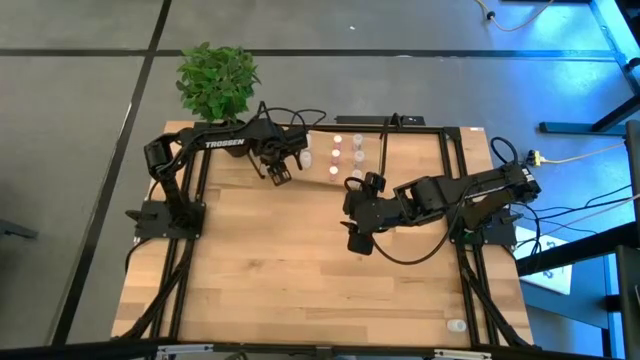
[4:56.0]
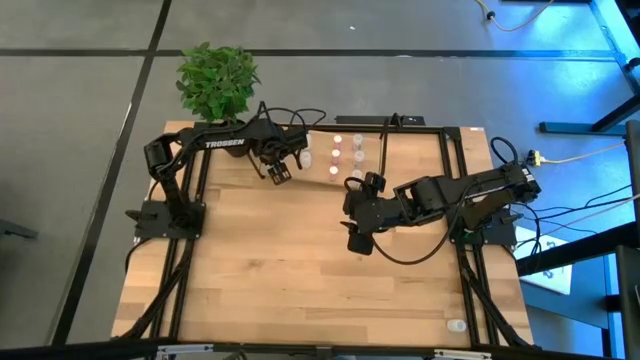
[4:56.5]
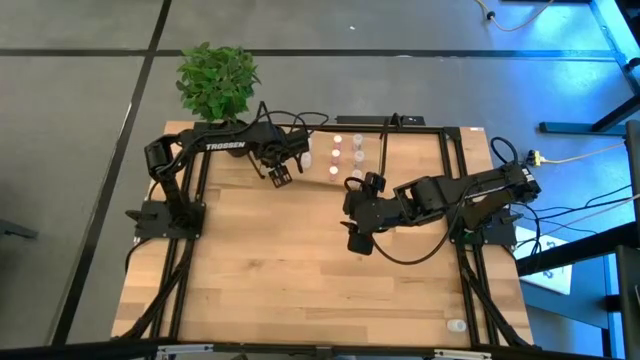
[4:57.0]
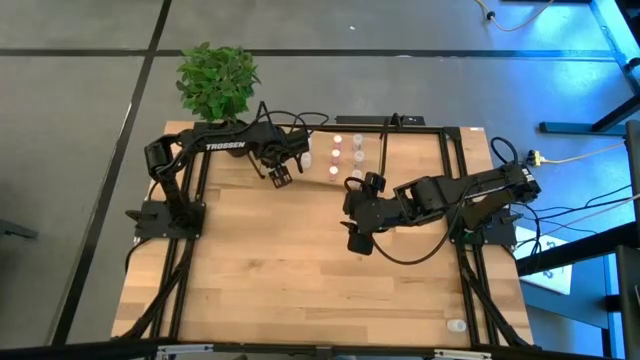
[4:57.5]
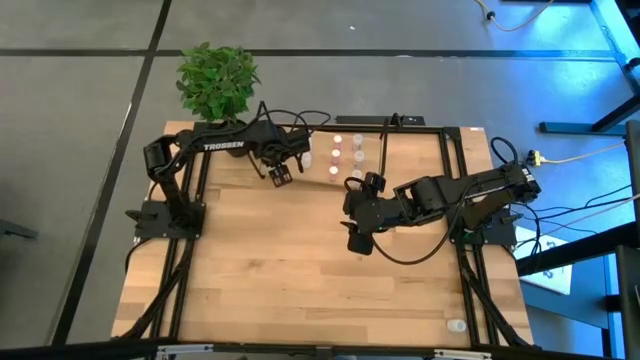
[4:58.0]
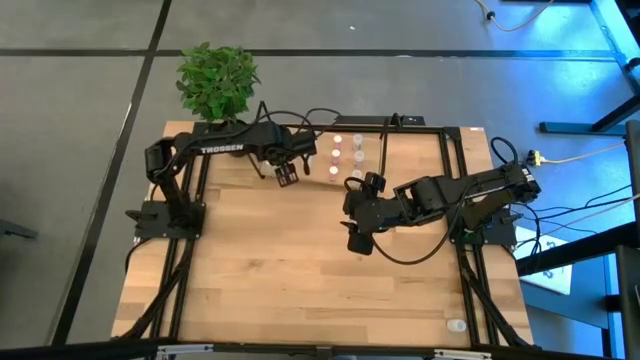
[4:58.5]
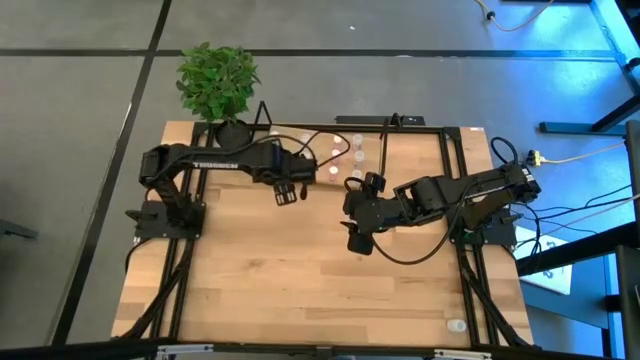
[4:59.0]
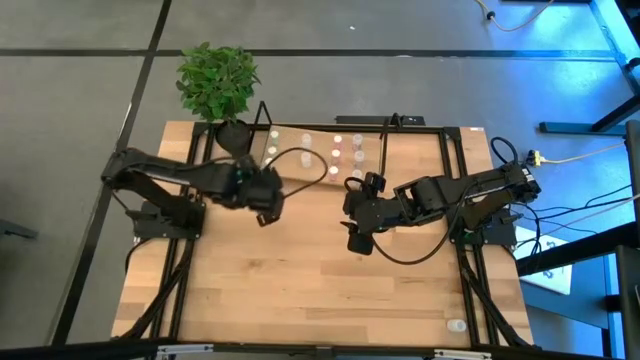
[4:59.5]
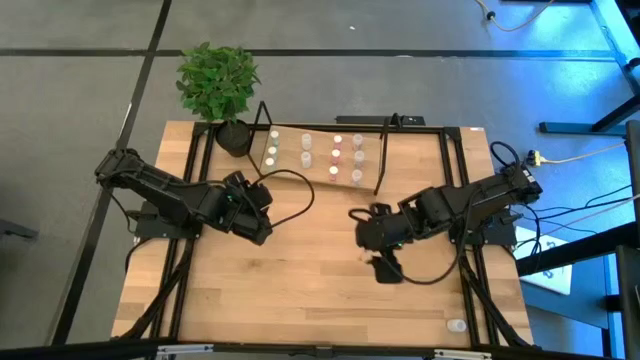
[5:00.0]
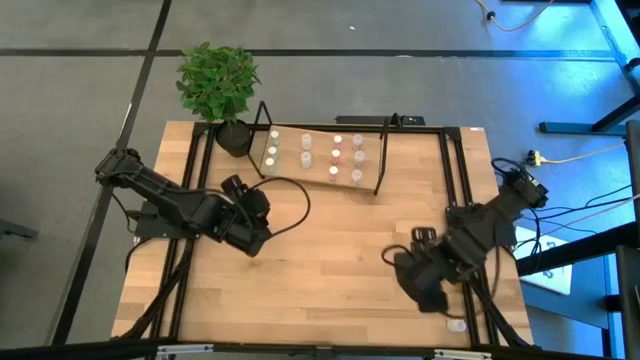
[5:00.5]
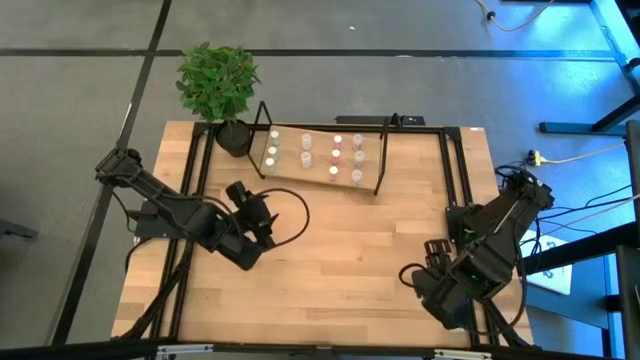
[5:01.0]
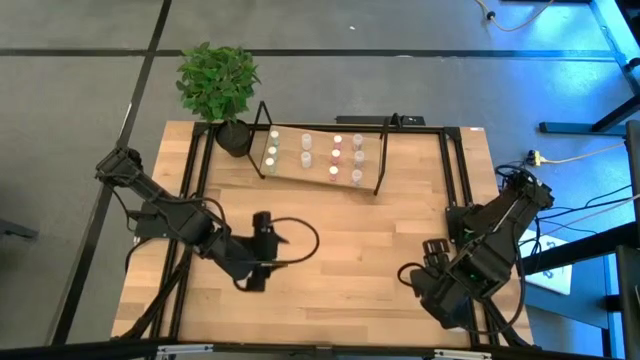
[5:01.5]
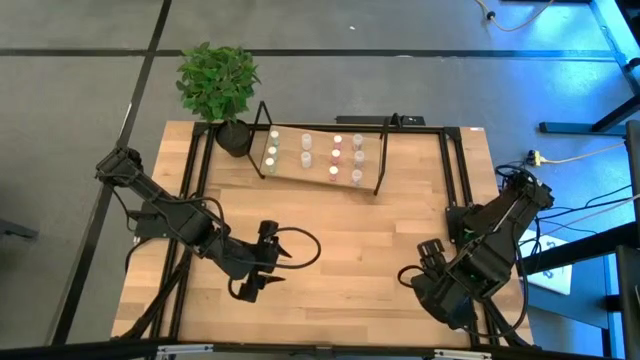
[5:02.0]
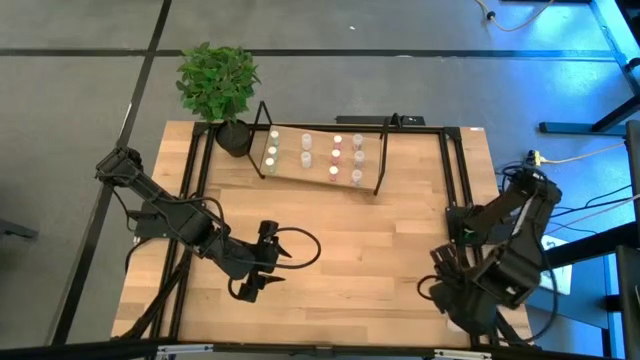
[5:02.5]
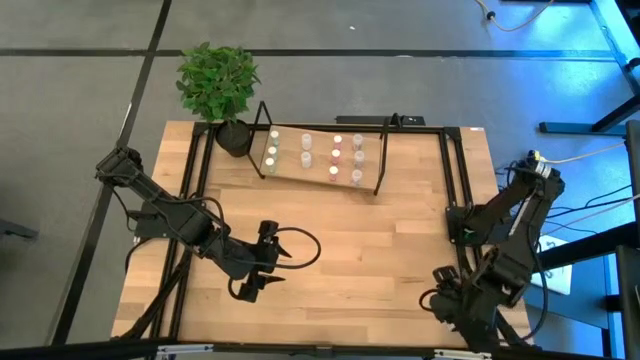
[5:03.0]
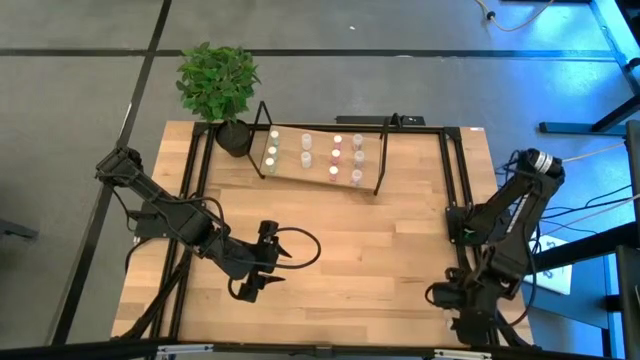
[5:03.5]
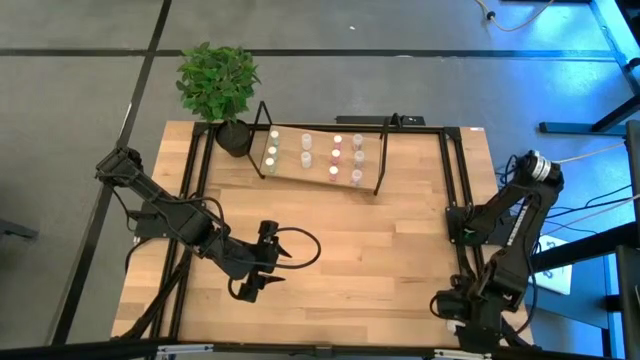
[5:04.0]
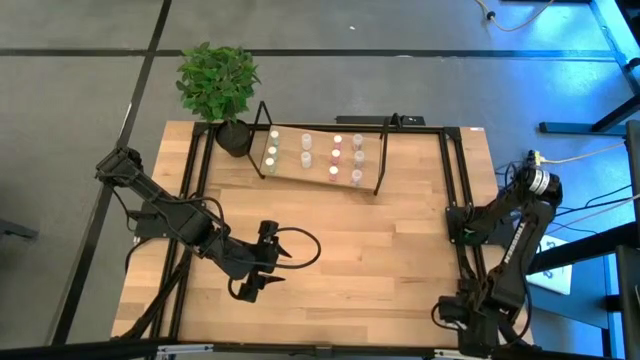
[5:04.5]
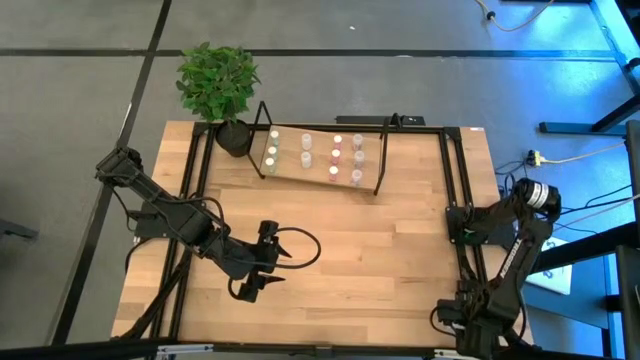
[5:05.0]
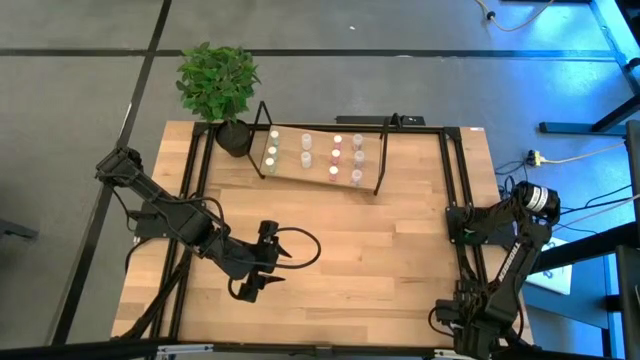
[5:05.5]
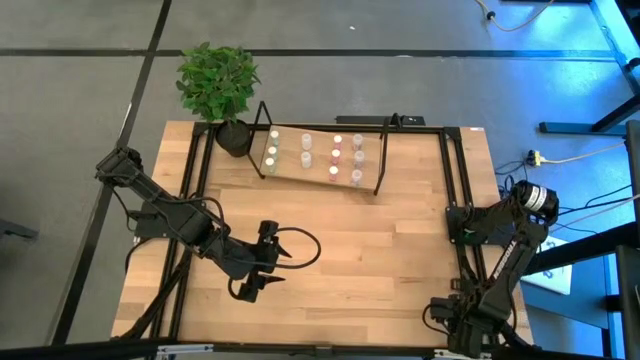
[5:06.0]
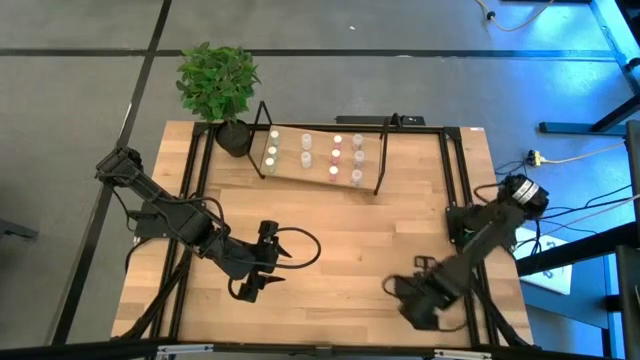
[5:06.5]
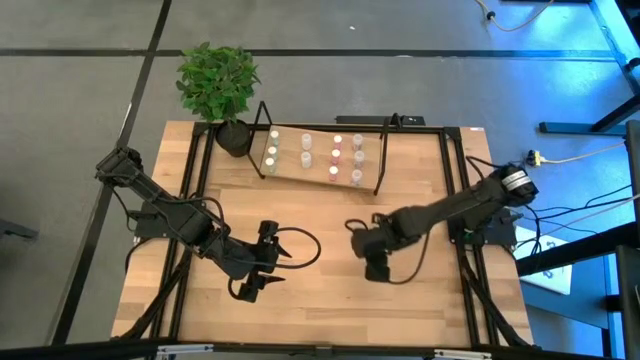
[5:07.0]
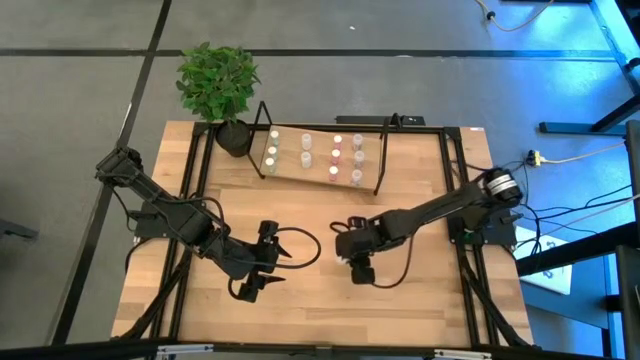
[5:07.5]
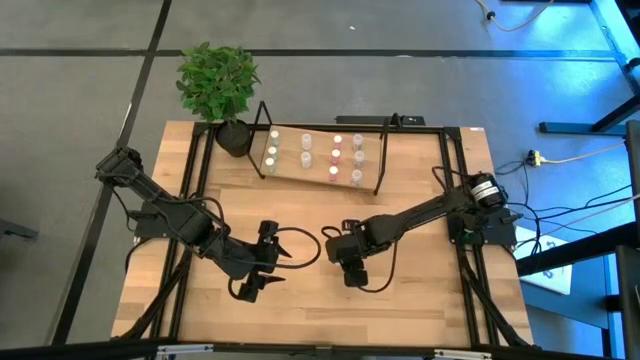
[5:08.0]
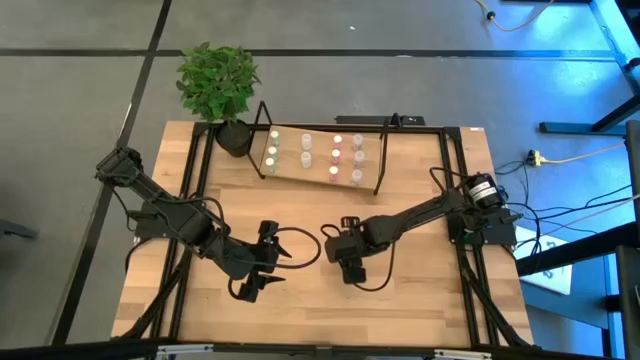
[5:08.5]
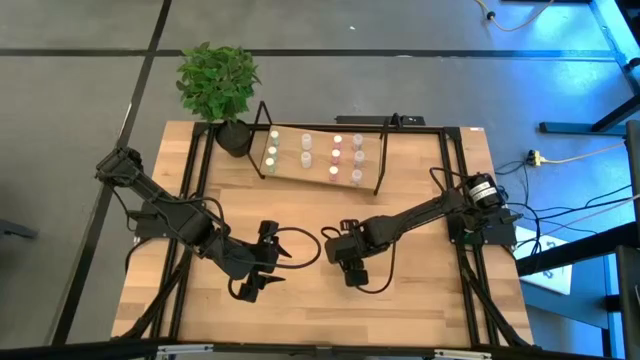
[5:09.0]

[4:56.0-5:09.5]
Task: Pick and place medicine bottles onto shelf by color
Put the white medicine bottle on the shelf aligned with the other white medicine bottle

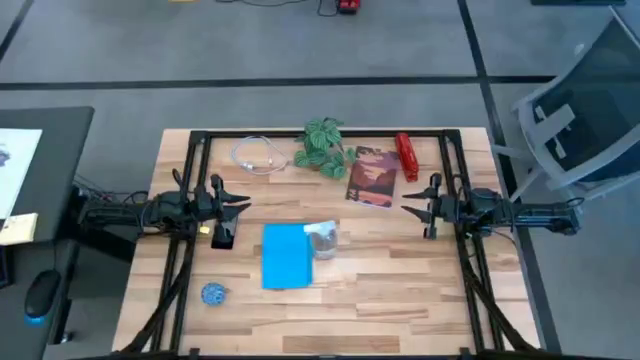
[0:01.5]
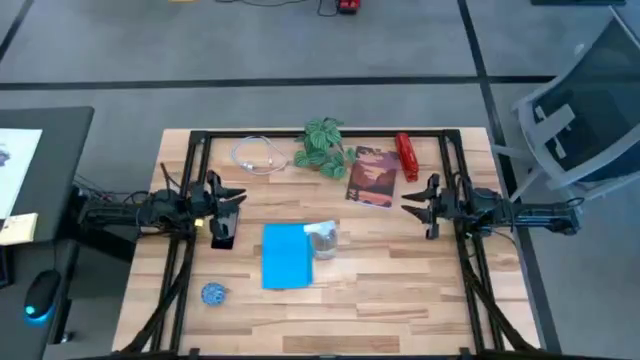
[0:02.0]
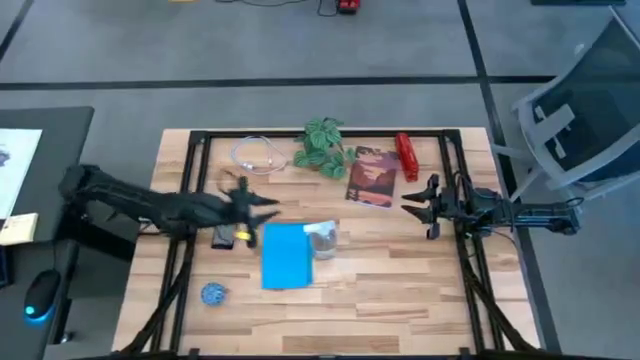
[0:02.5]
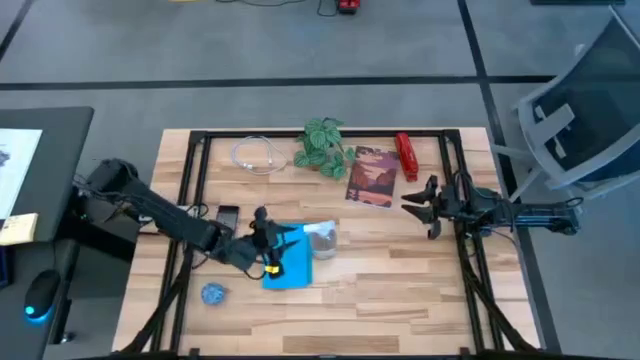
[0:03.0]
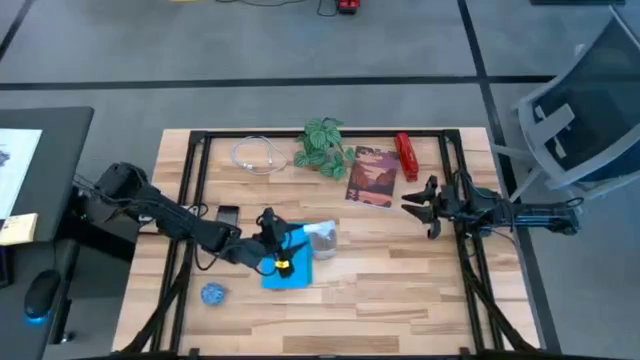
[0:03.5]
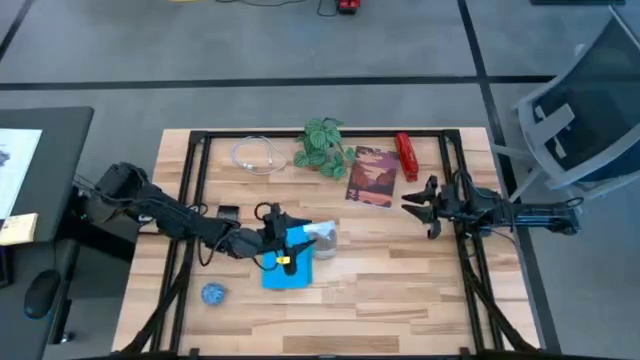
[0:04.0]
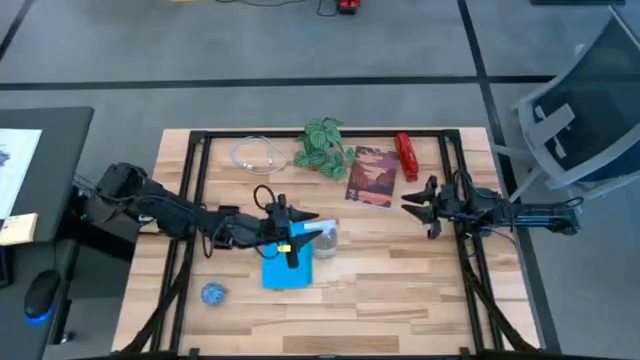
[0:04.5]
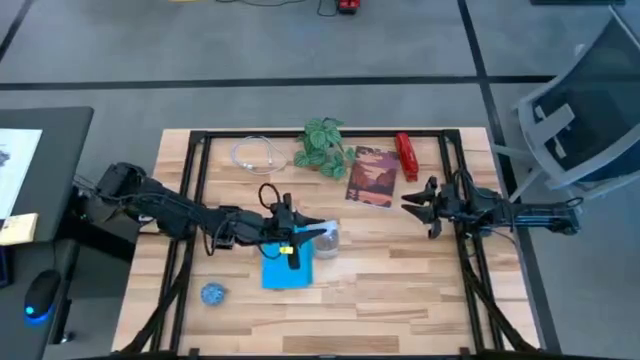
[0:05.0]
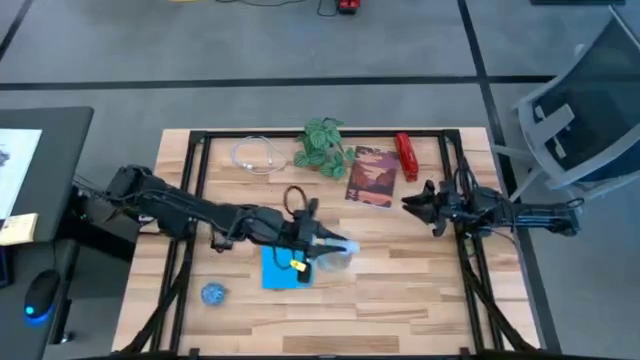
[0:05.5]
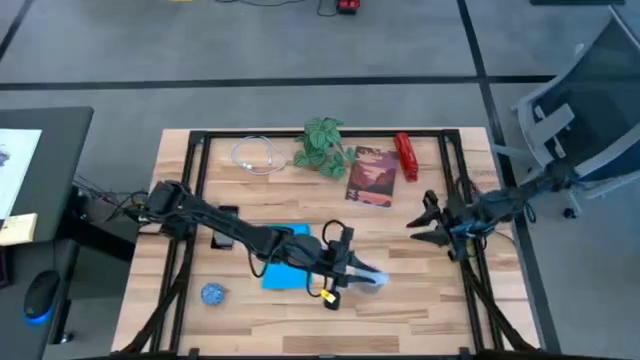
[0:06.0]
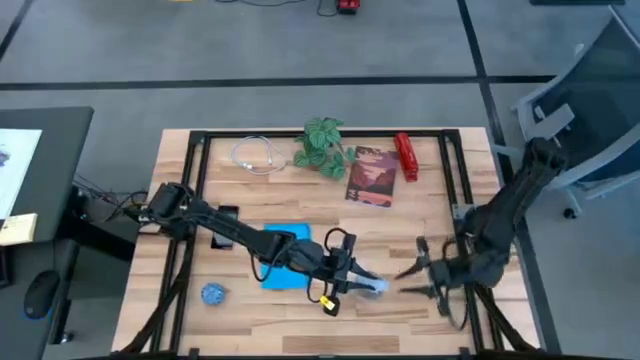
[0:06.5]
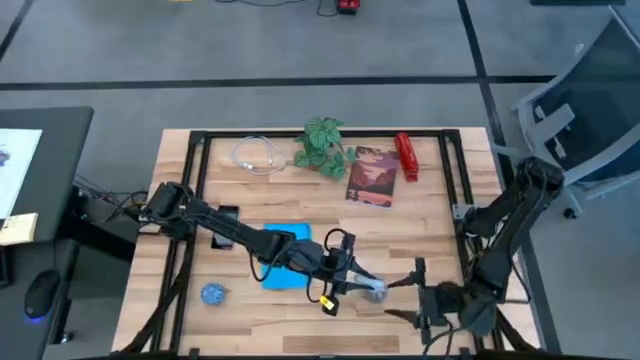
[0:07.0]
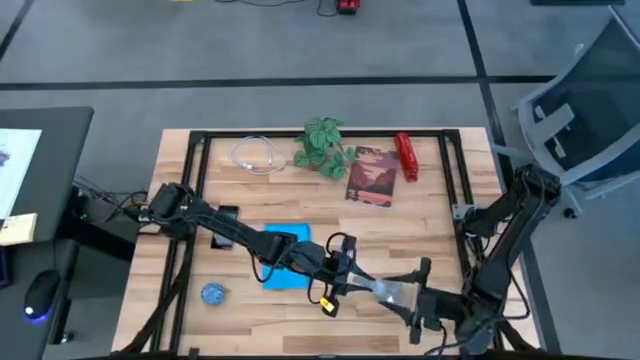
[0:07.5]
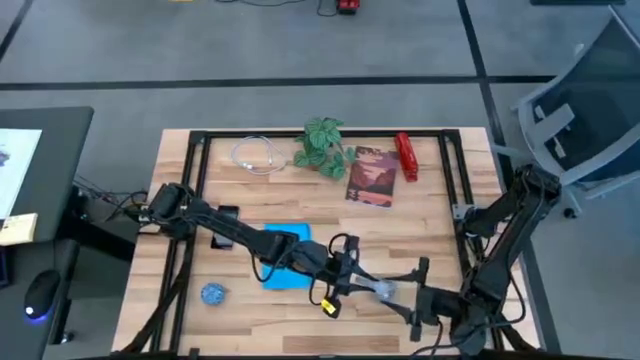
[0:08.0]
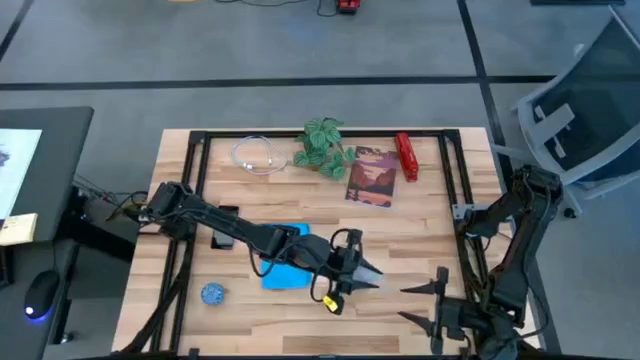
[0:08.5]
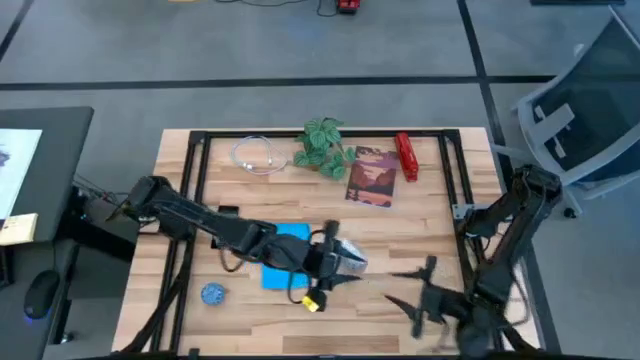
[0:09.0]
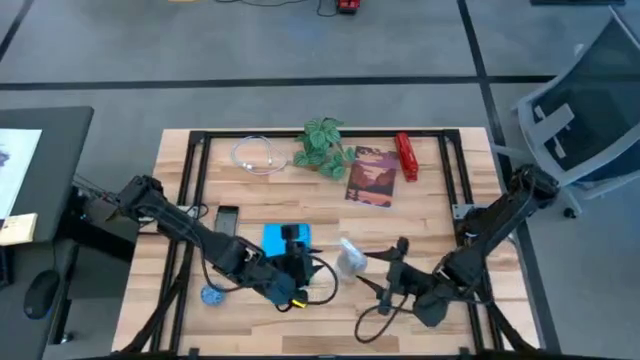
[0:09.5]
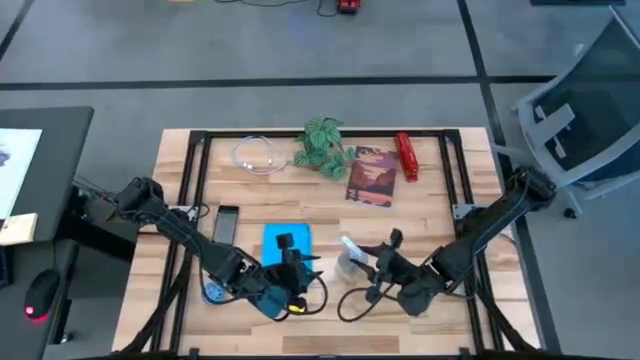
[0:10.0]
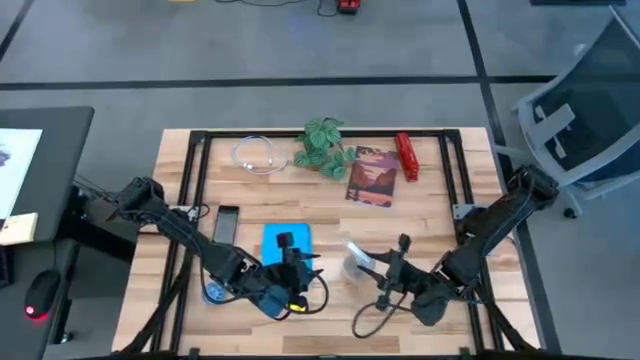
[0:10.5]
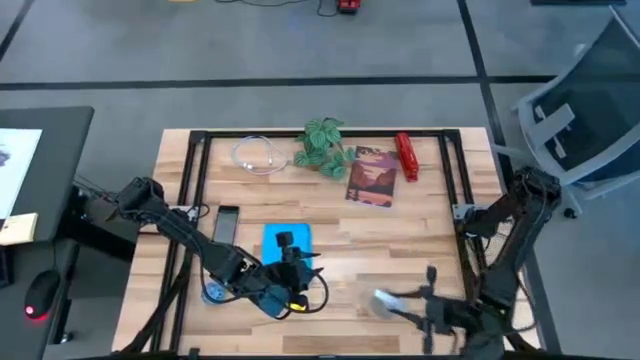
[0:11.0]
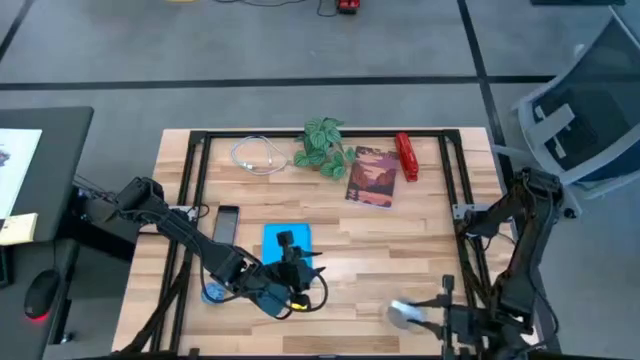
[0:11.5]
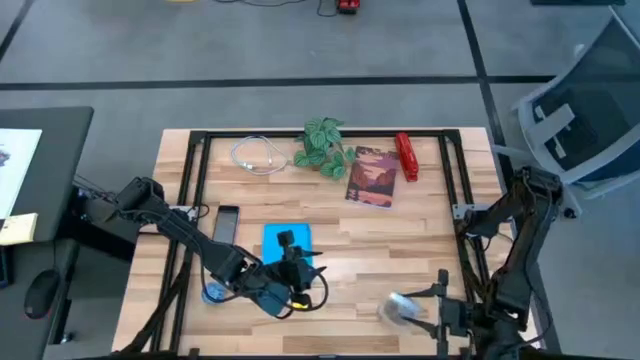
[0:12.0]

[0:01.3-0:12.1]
Task: Apply microfiber cloth
Prepare the transparent spray bottle
